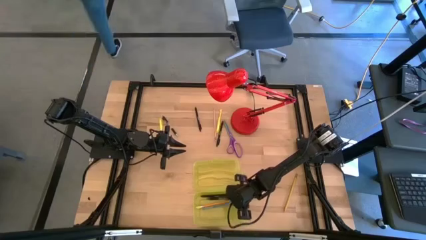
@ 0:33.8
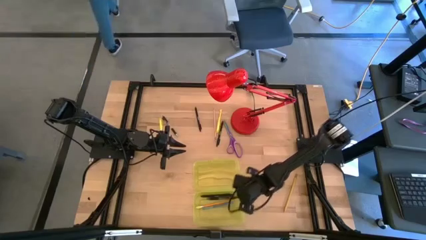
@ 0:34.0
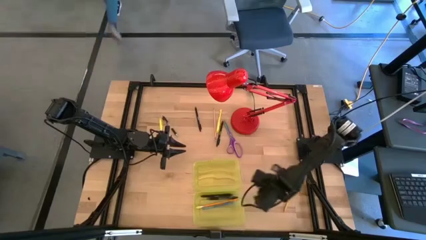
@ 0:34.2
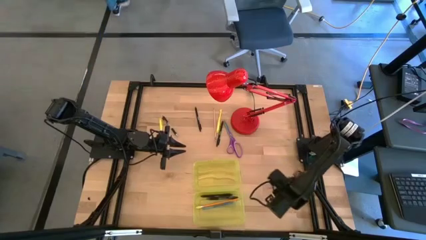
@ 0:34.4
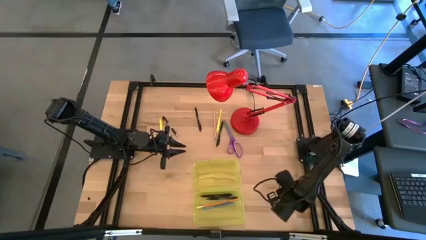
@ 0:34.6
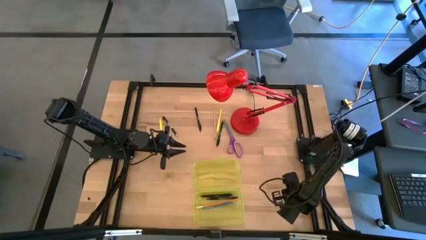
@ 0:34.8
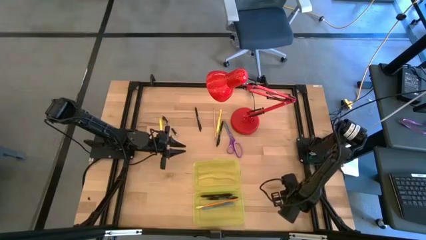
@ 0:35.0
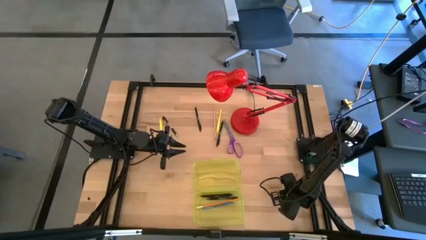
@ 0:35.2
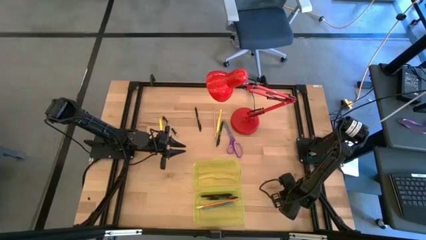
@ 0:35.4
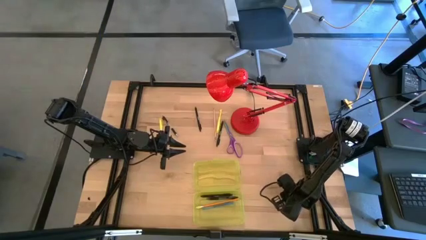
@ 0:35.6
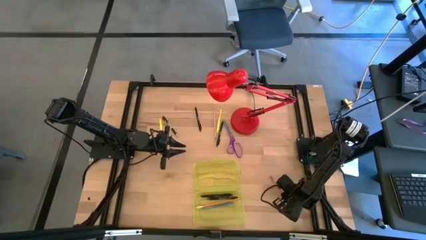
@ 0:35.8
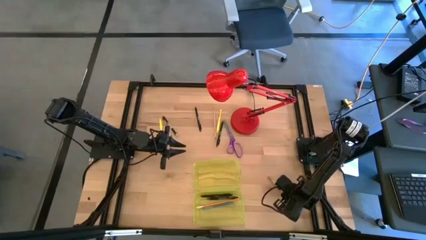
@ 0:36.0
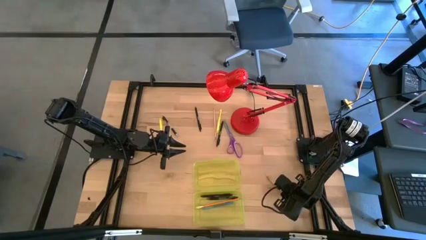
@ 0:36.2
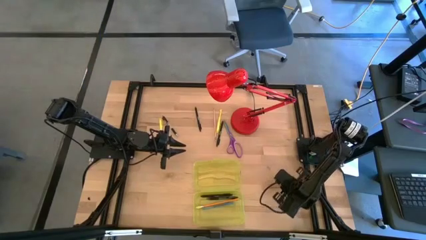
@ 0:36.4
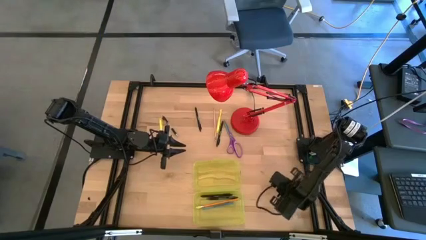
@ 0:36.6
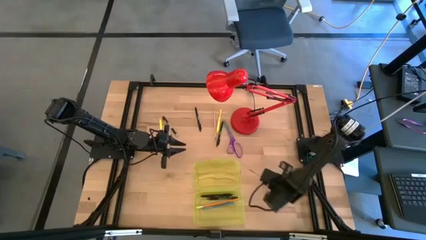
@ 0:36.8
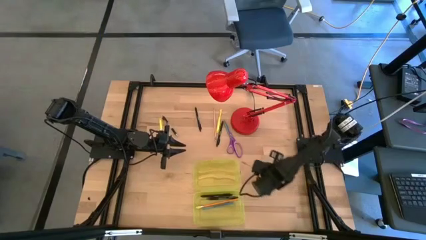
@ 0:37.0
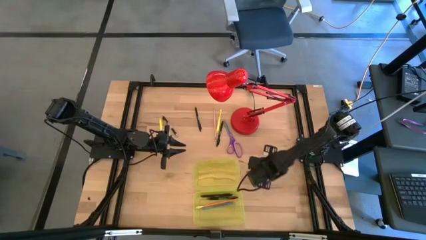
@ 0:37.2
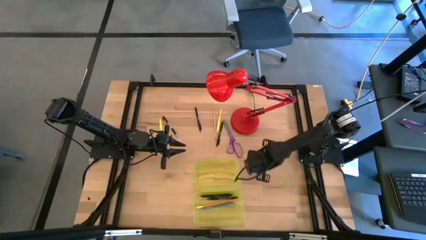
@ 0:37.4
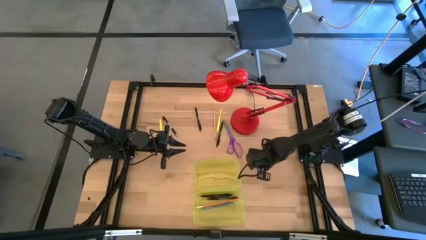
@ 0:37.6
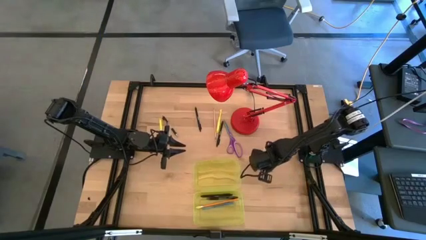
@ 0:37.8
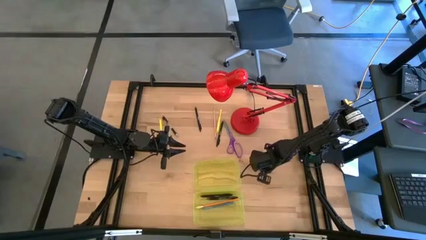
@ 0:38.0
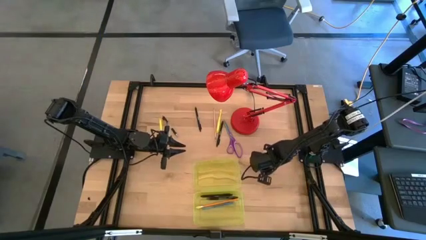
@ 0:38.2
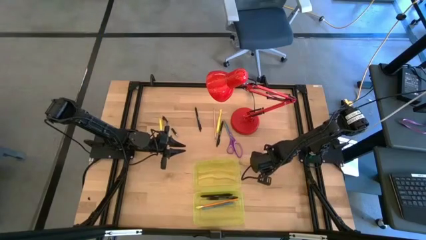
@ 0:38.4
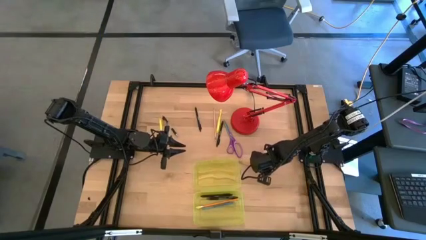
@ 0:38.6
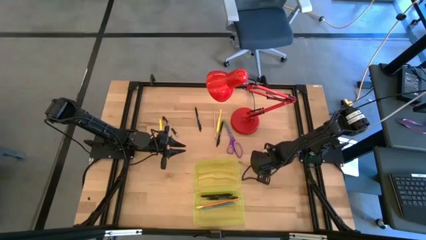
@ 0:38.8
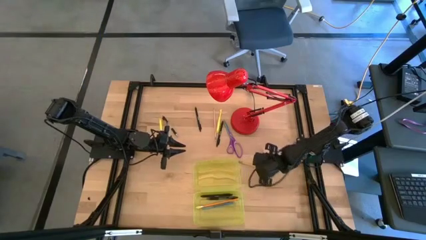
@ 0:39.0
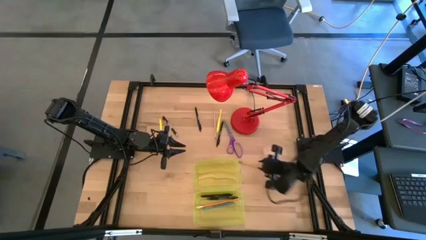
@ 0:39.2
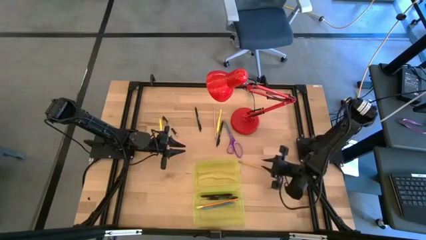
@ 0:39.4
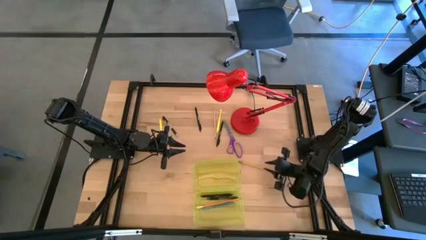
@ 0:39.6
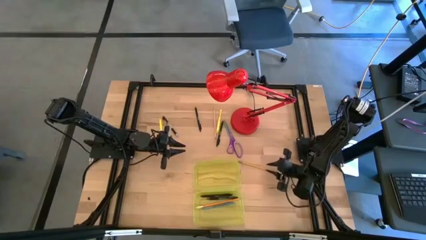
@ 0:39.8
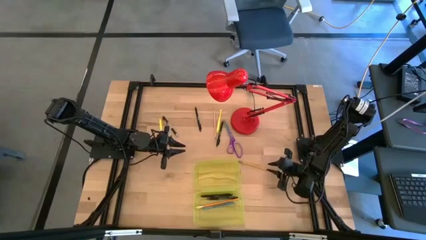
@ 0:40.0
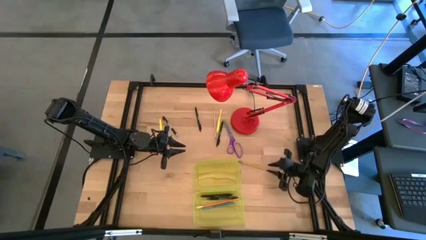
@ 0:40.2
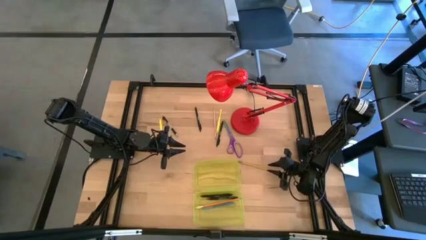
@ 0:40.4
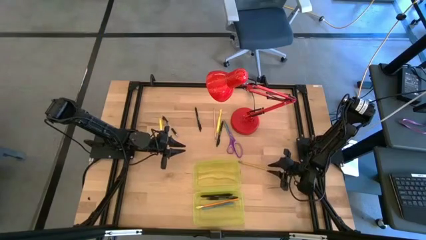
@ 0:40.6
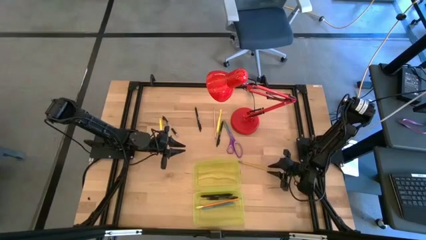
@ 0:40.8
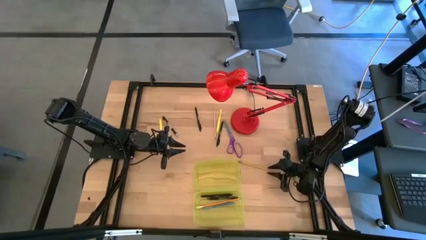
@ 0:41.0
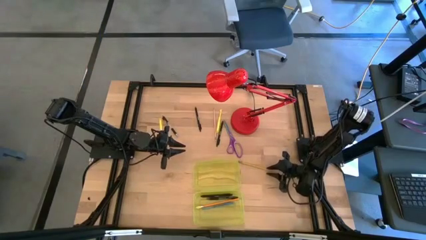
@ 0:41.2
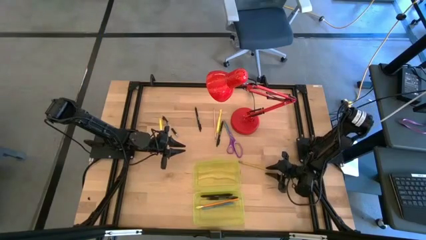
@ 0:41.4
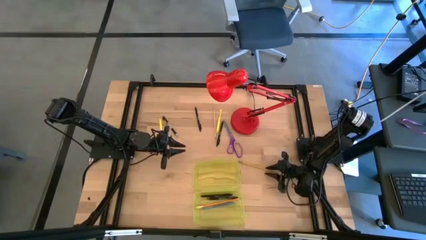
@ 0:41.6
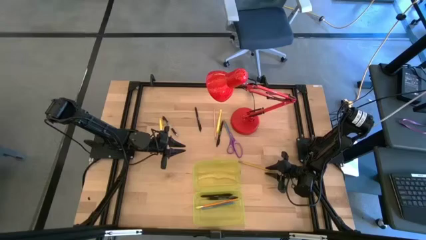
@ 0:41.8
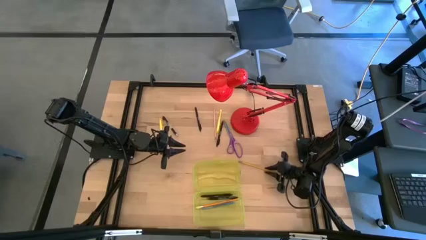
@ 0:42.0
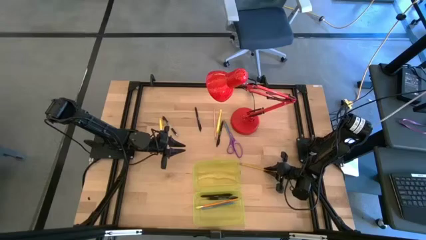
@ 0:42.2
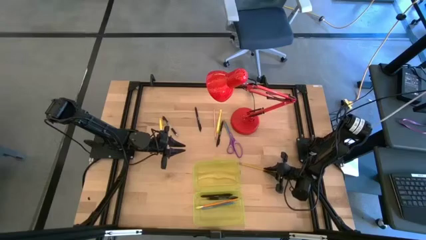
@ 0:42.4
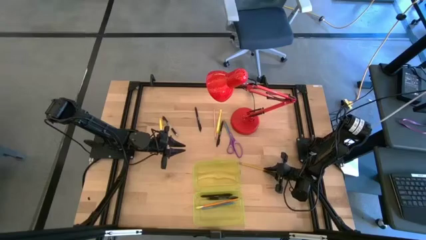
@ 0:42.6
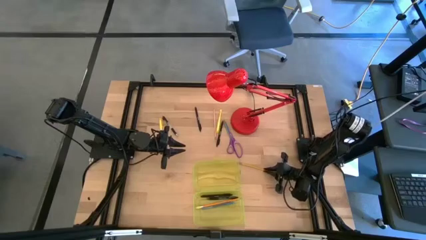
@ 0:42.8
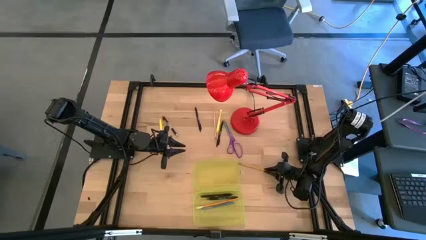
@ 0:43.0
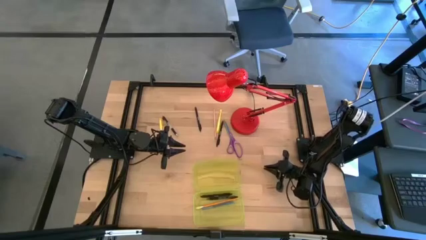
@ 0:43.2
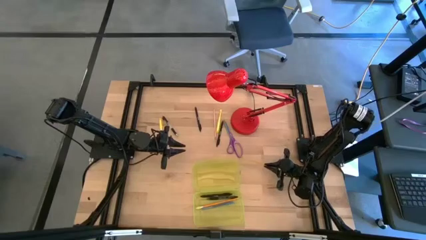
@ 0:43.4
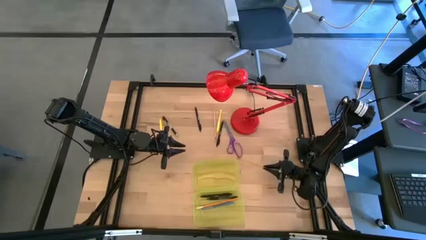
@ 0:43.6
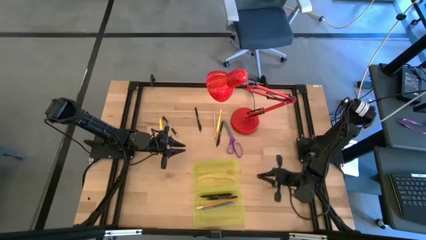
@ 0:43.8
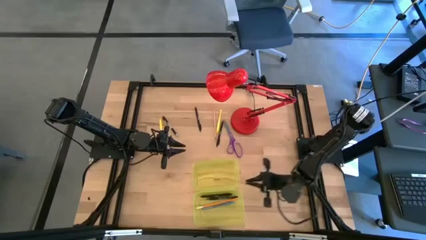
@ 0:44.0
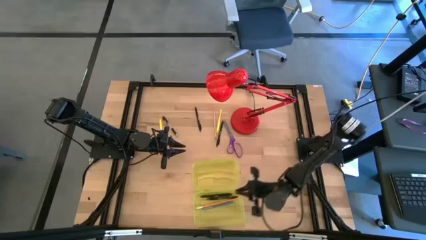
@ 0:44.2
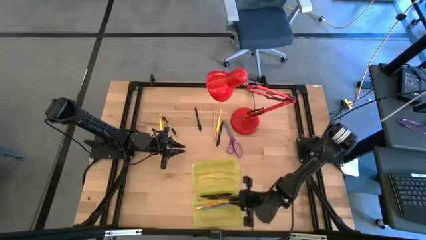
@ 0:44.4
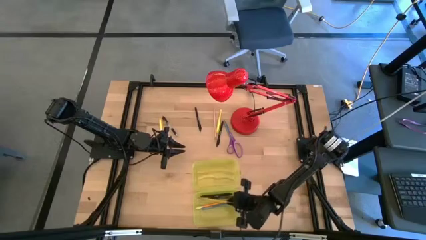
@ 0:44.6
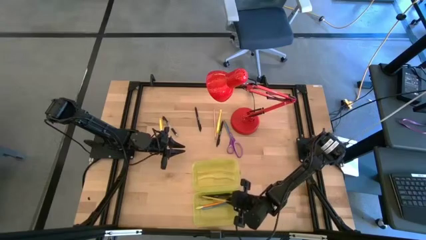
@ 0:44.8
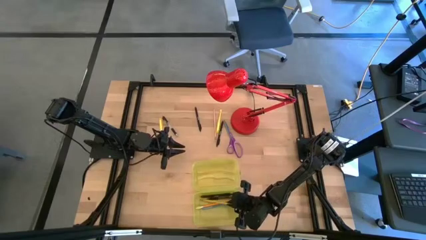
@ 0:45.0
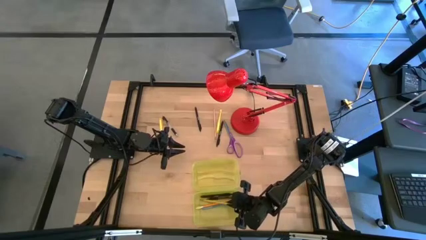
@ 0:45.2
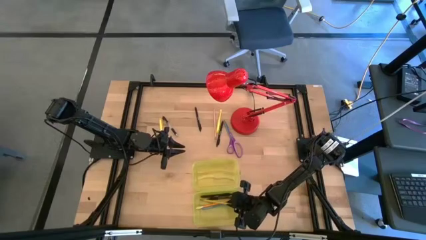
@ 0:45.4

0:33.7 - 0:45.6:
Task: Pick & place school supplies into a supply box
Put the yellow pencil into the yellow supply box

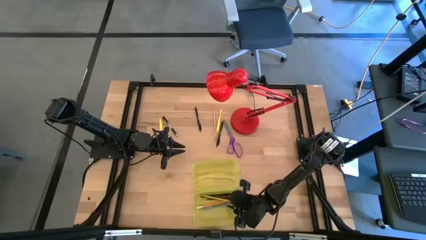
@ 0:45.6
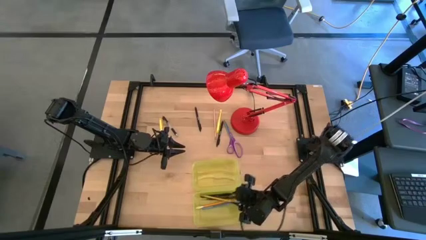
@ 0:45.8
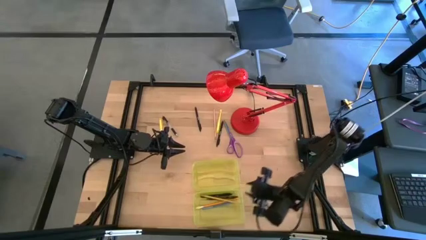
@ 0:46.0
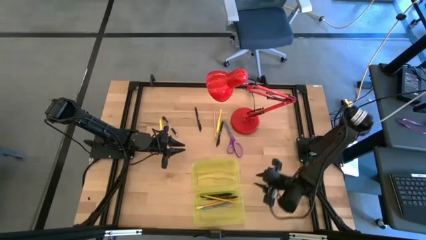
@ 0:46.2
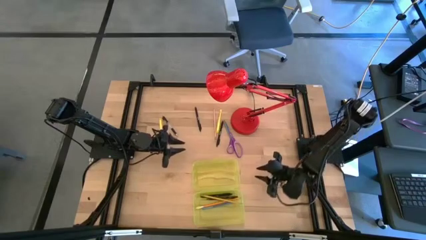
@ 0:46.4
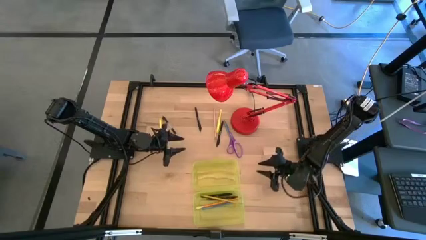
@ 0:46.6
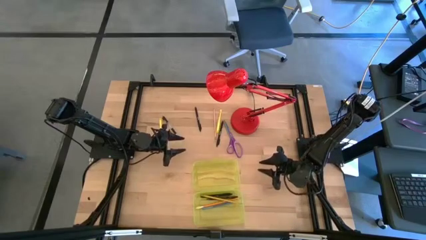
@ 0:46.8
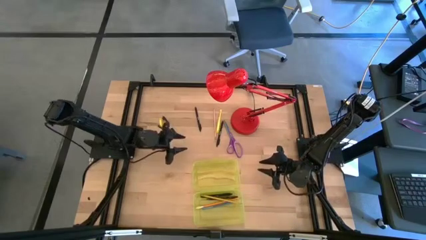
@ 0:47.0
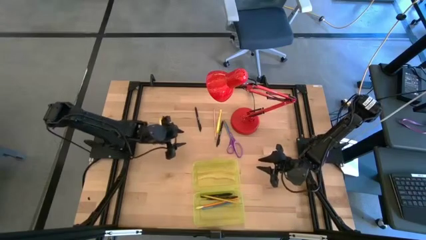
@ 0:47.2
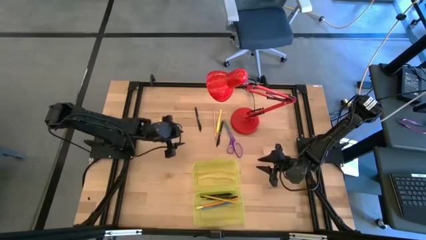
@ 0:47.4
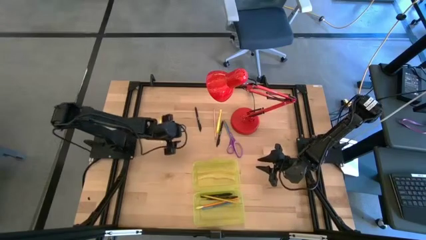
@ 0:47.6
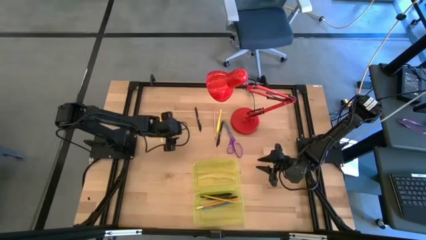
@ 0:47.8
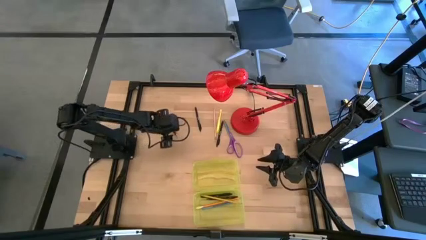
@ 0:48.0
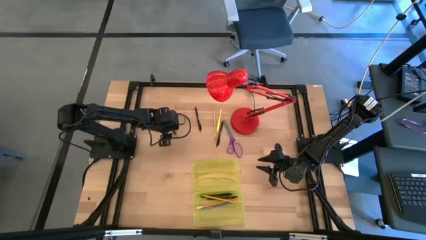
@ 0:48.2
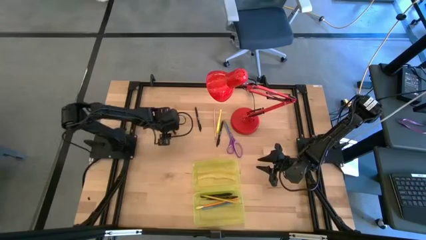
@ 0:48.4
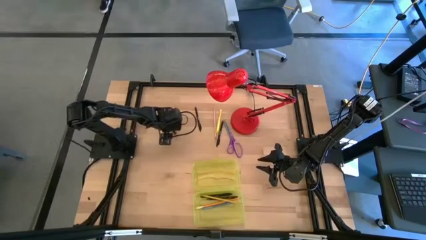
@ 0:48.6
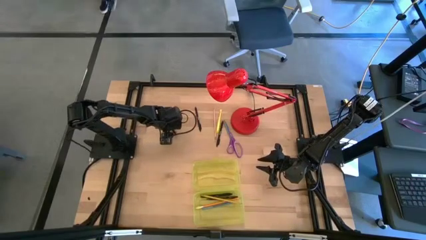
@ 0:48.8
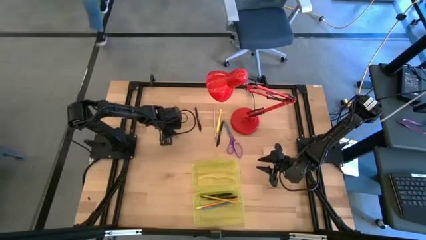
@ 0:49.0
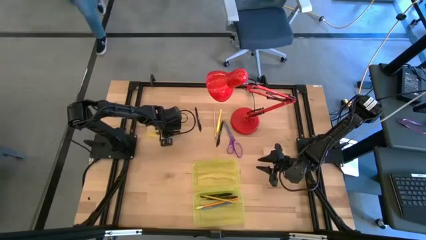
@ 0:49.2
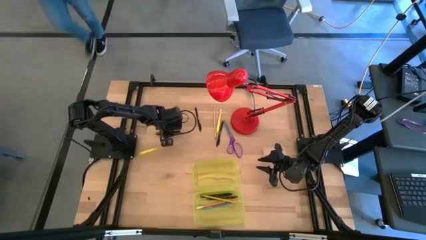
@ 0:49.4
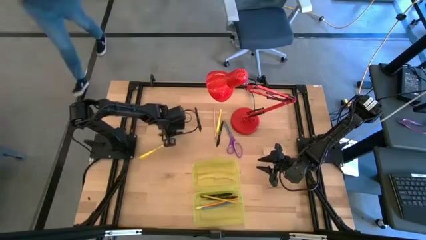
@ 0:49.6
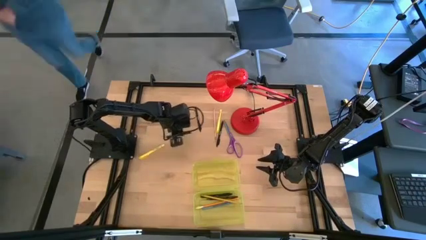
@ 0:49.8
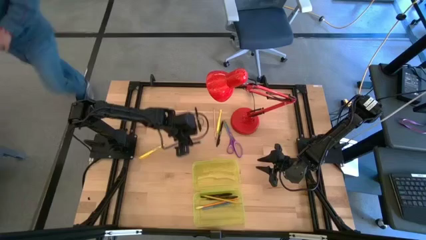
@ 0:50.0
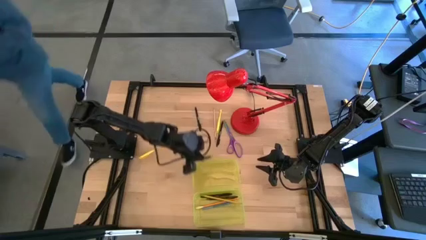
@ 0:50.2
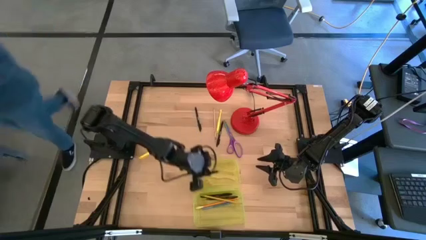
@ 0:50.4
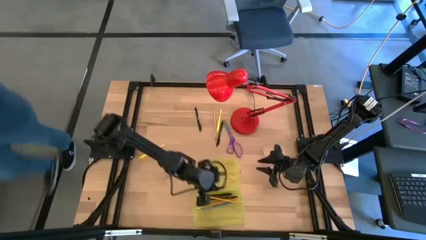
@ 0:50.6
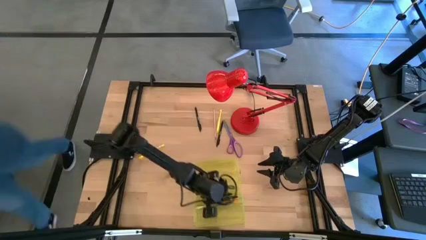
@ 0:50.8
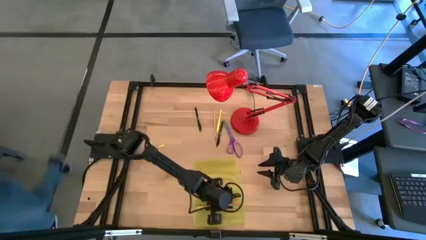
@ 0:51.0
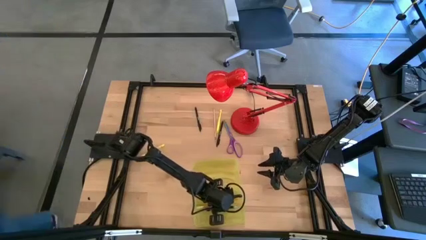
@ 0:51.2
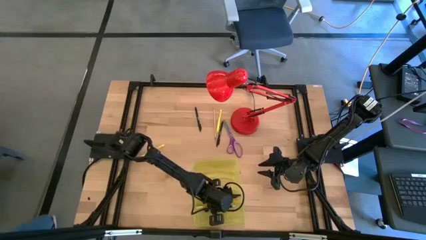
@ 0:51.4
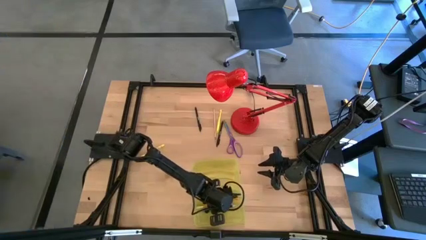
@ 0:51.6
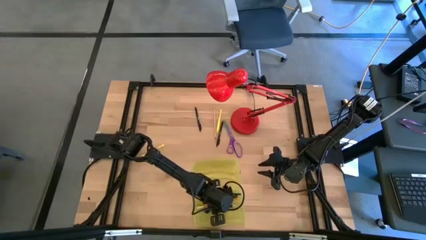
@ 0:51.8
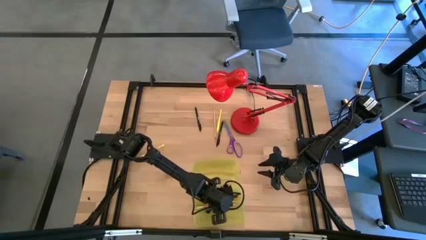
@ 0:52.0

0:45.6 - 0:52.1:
Put the black pen into the yellow supply box
